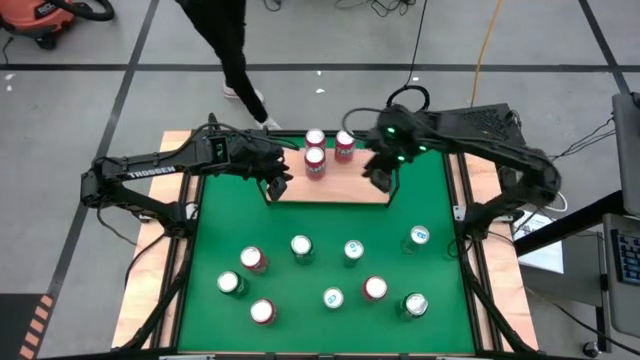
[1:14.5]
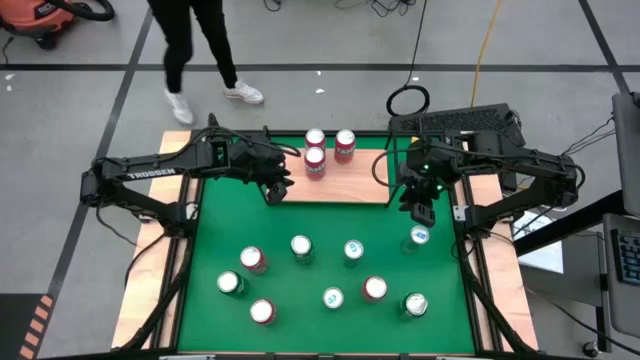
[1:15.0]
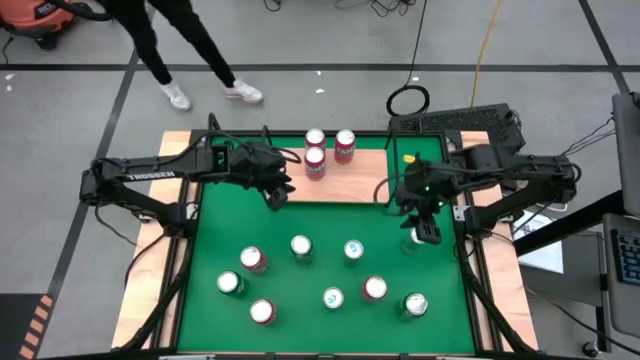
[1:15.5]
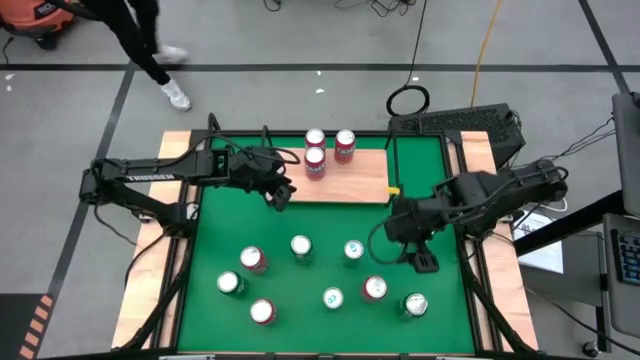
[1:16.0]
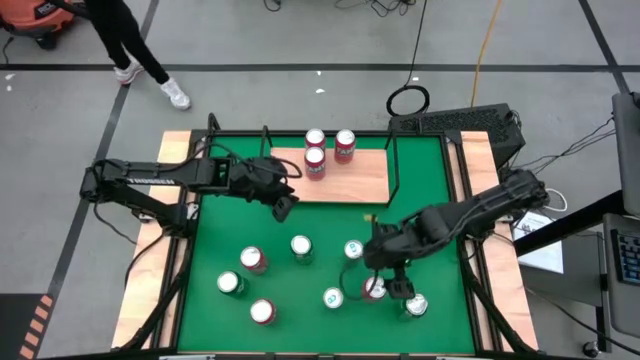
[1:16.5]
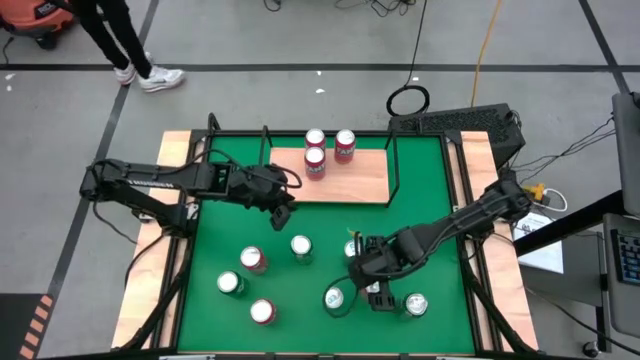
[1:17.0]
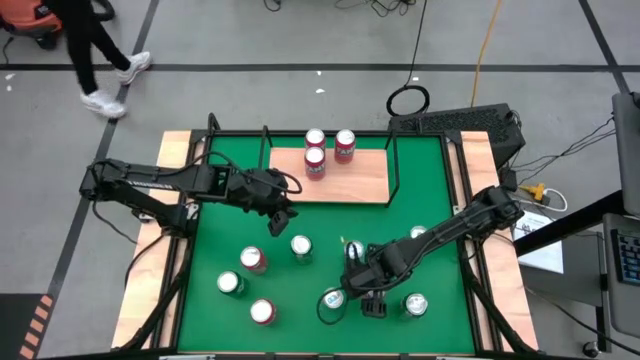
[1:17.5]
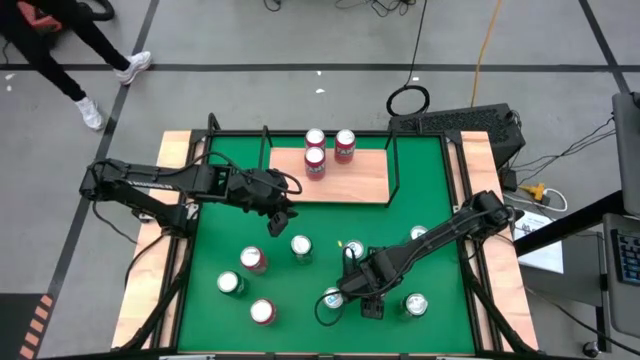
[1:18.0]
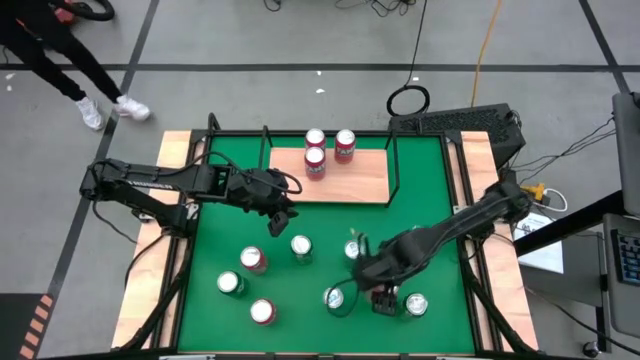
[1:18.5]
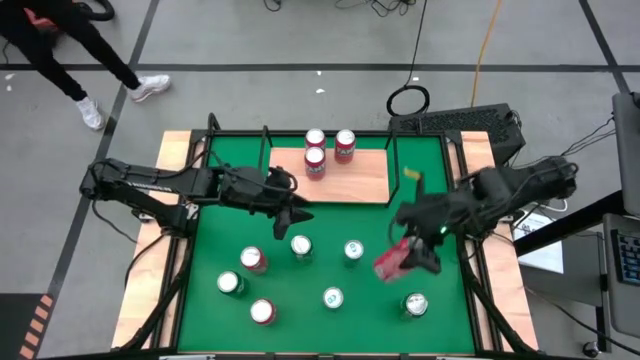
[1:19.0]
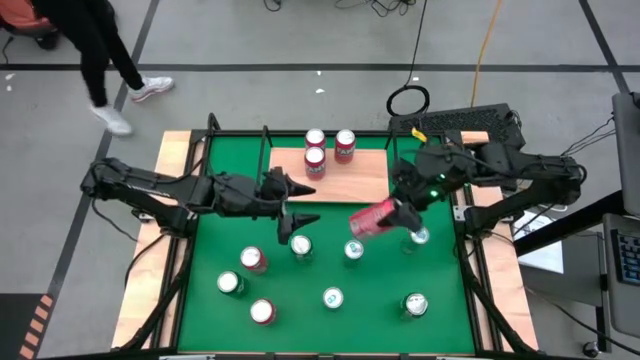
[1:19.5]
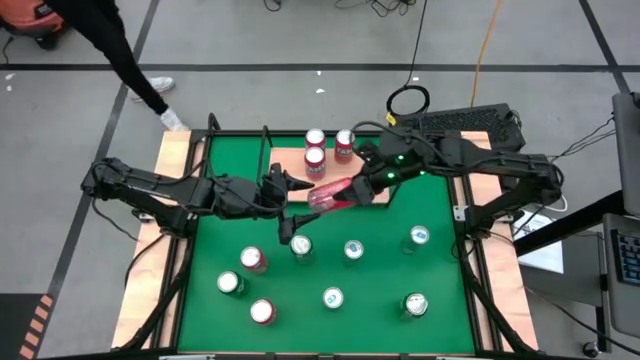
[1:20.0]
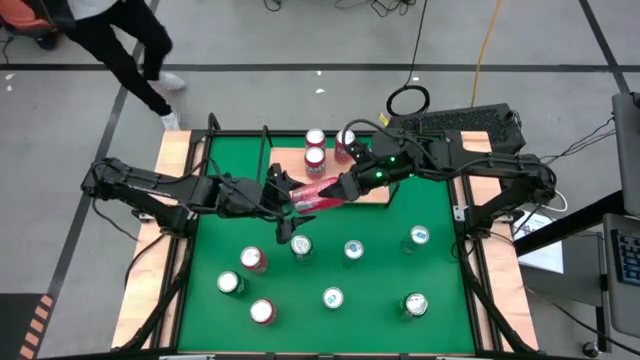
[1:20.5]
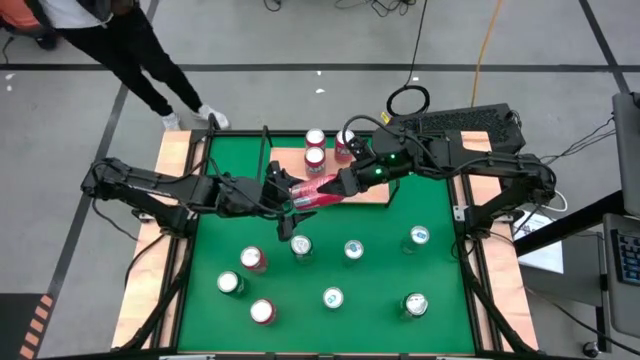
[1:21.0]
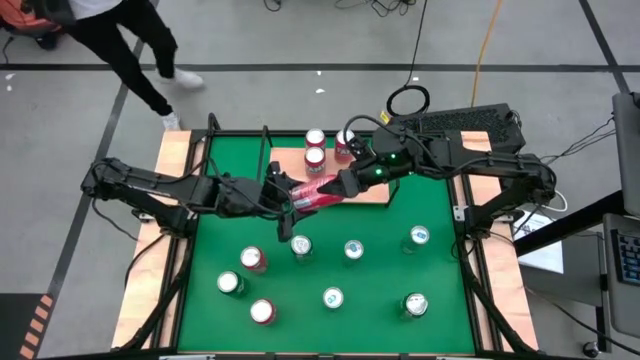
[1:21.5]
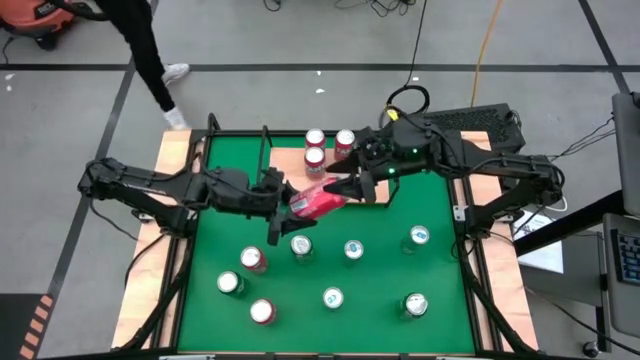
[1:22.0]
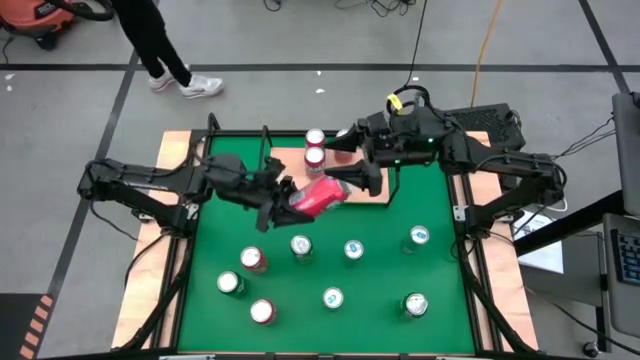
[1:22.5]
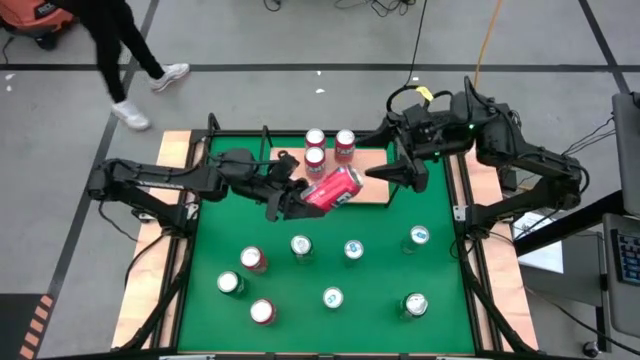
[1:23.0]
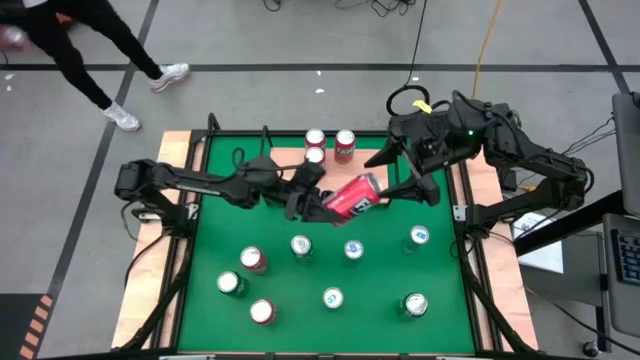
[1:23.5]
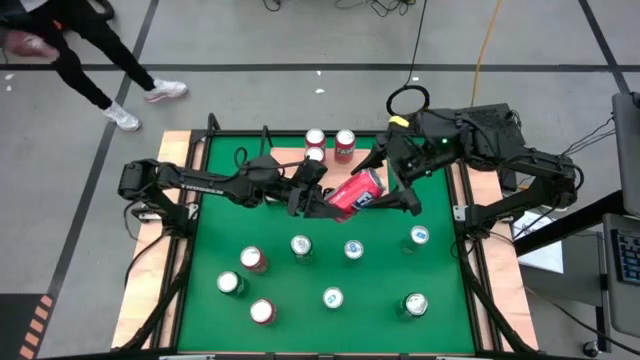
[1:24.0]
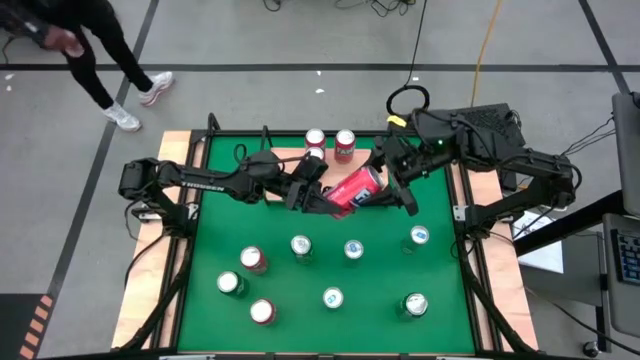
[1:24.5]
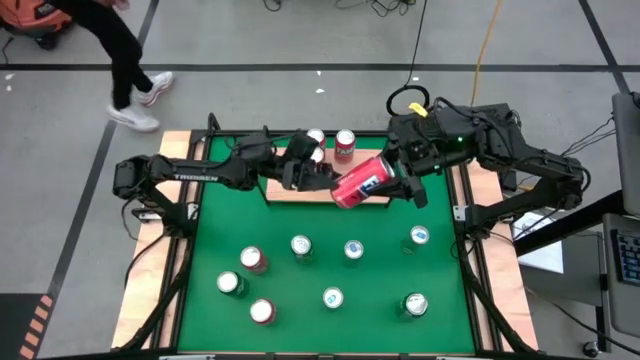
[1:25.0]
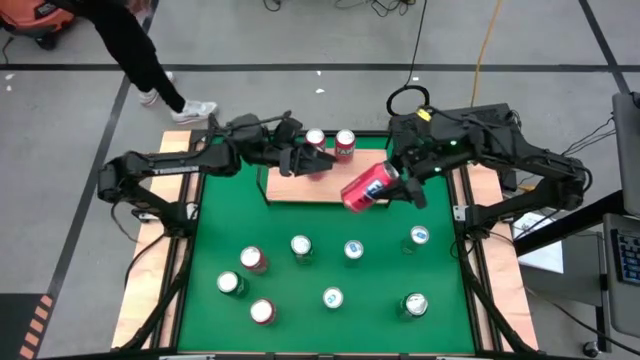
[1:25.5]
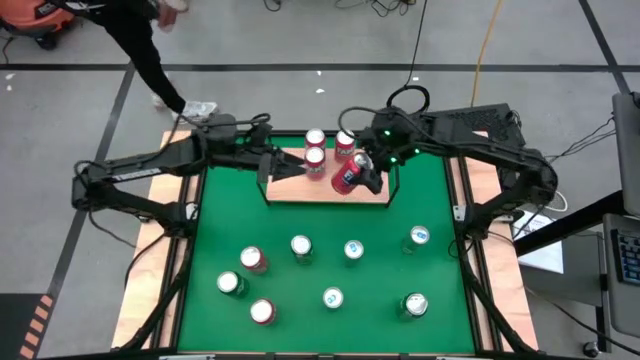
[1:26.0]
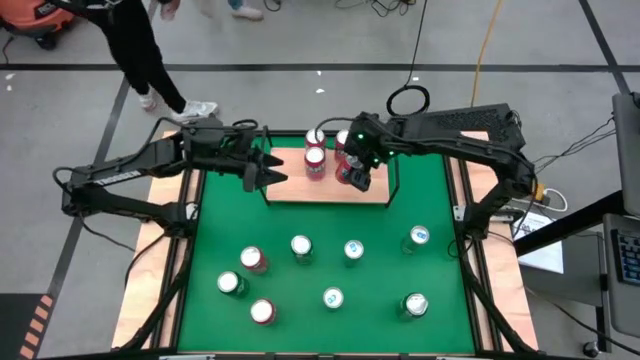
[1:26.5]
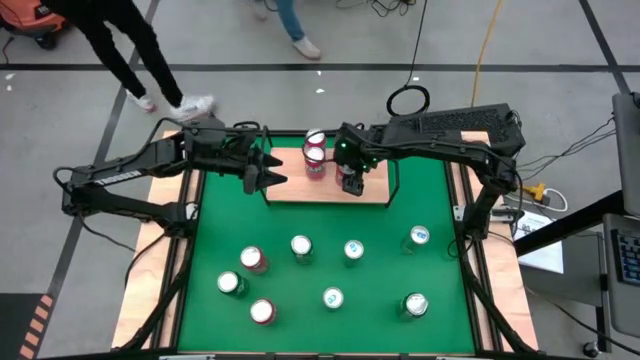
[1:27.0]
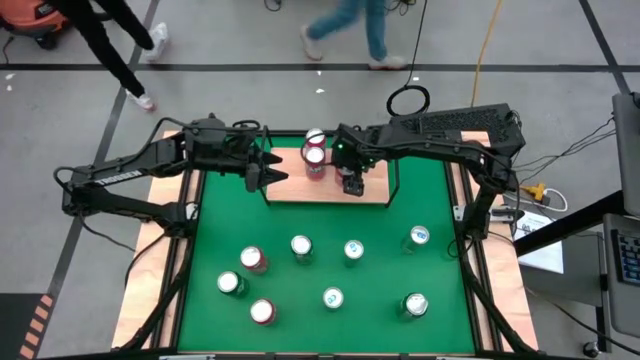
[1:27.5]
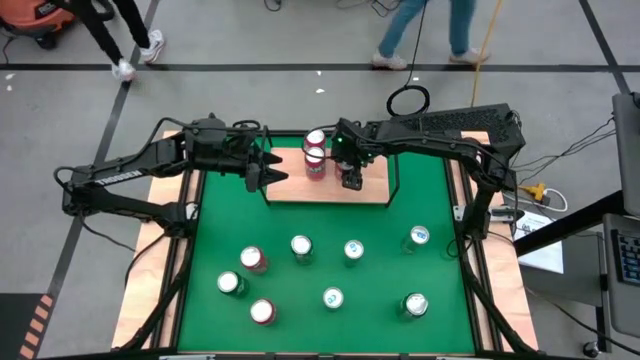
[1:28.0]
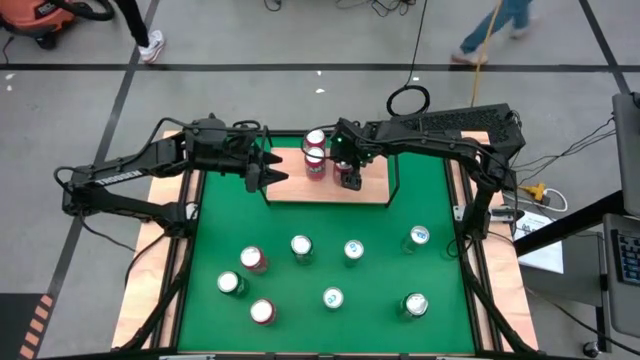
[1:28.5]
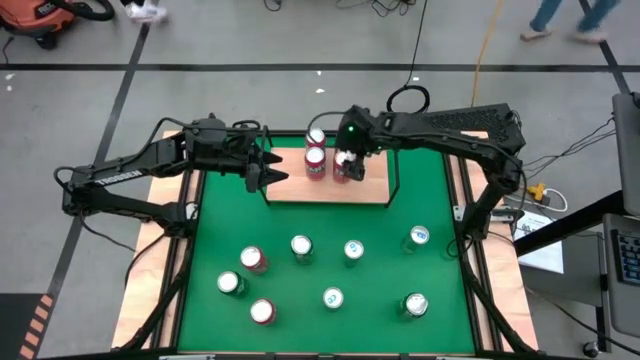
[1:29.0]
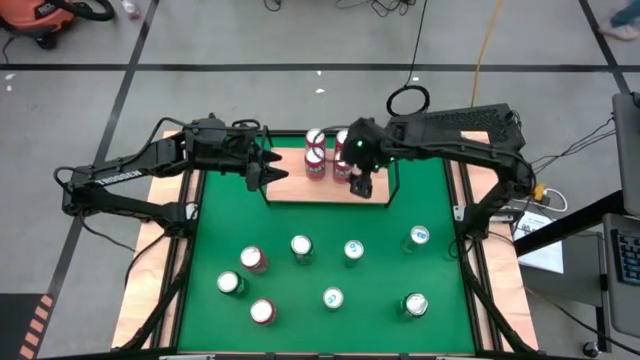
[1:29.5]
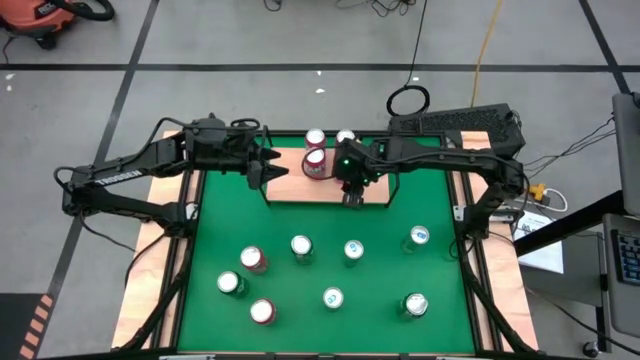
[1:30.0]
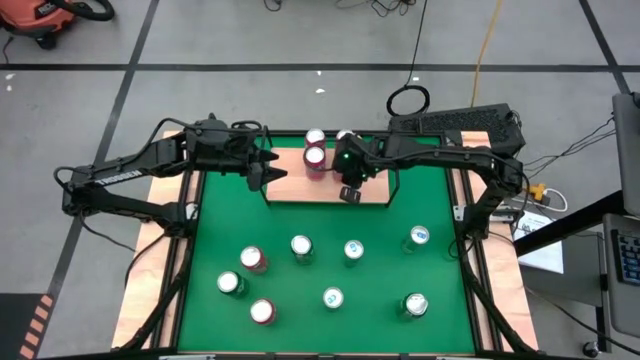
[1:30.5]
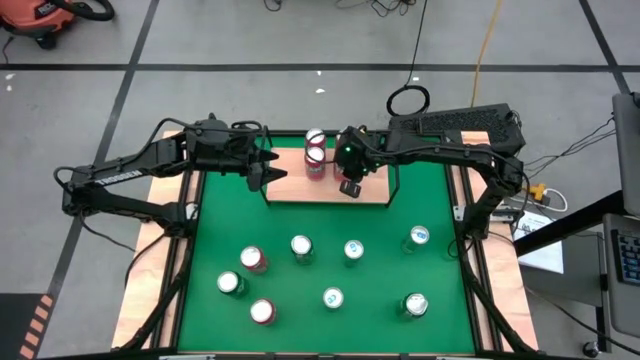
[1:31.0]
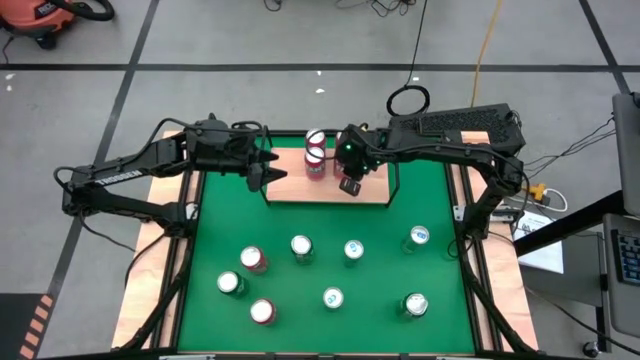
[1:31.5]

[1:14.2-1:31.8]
Task: Place canned beverage on shelf
Put the red soda can on the shelf aligned with the other right red soda can

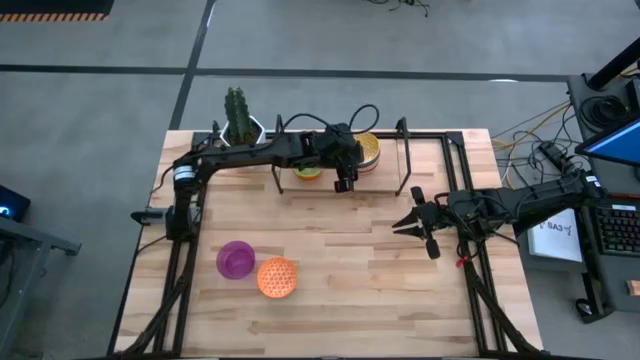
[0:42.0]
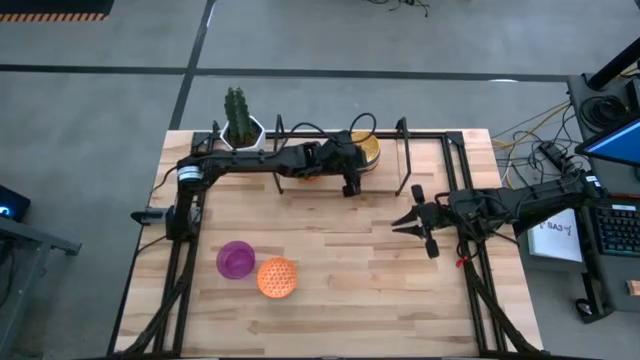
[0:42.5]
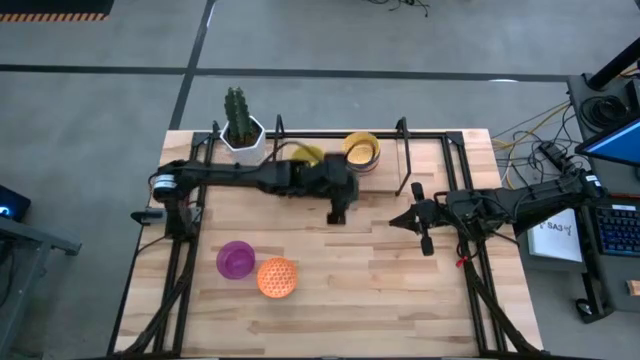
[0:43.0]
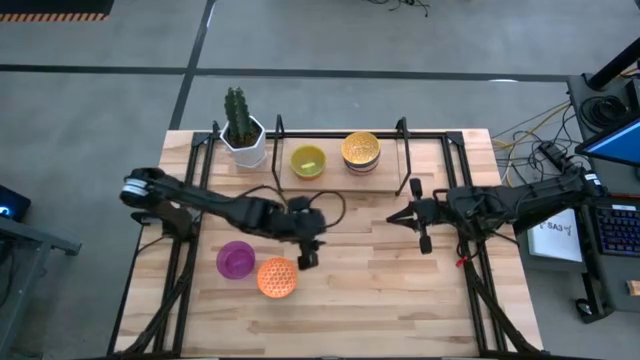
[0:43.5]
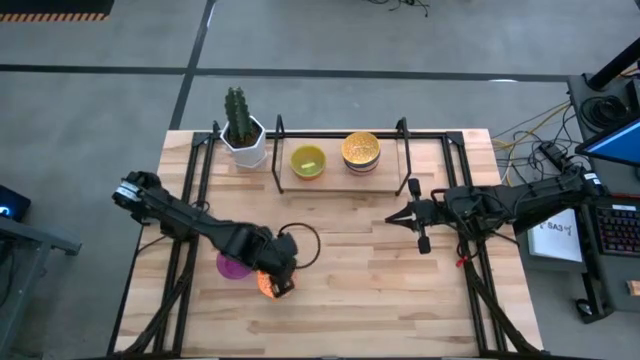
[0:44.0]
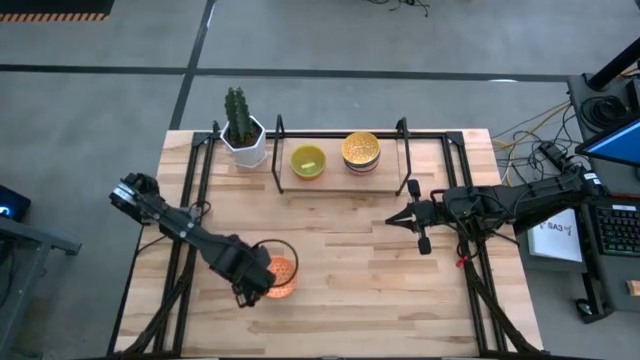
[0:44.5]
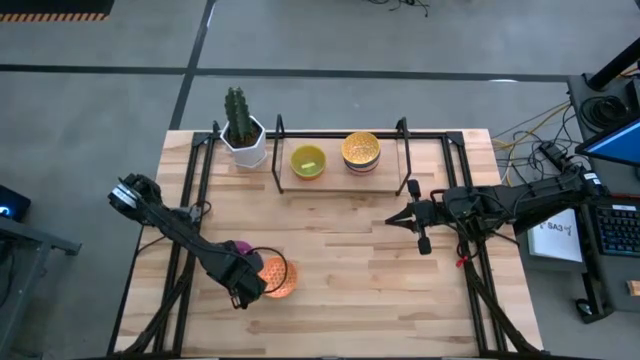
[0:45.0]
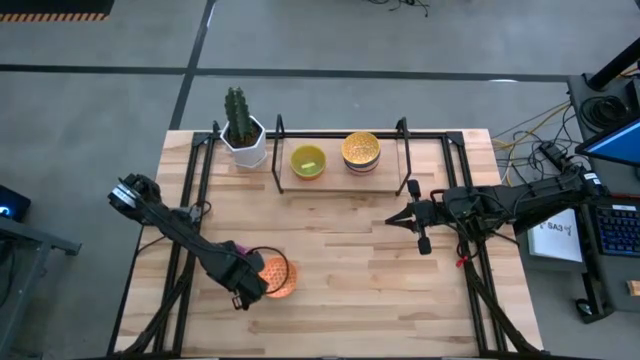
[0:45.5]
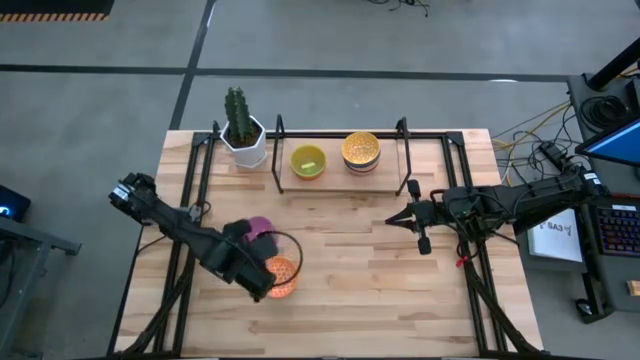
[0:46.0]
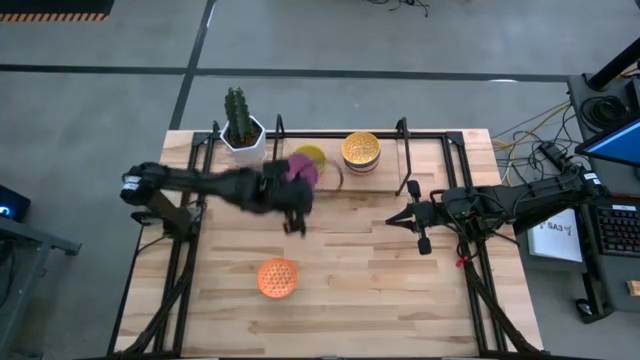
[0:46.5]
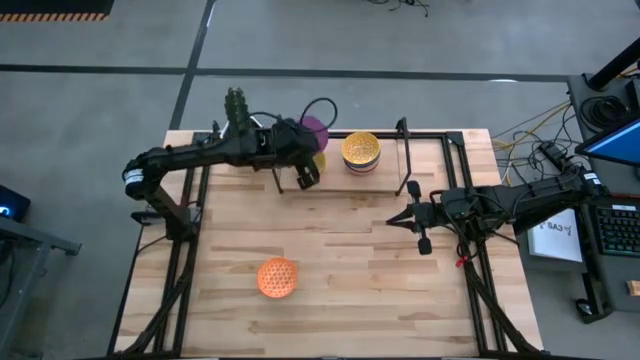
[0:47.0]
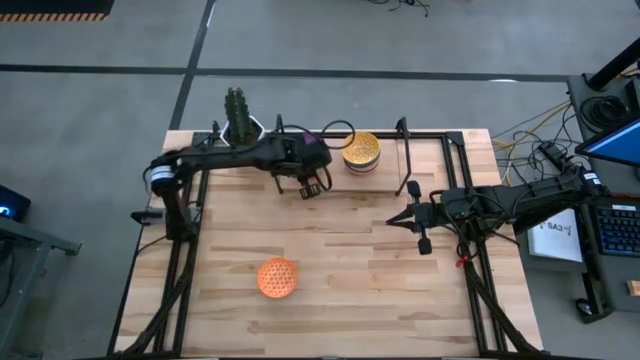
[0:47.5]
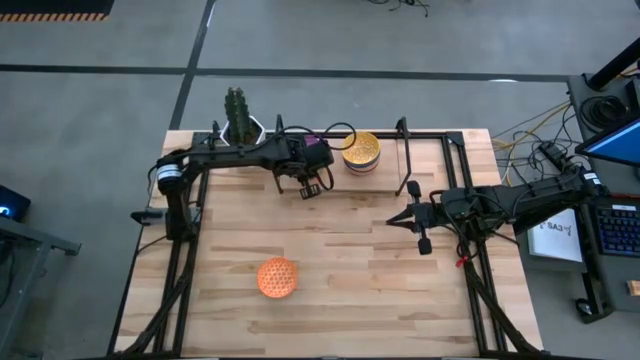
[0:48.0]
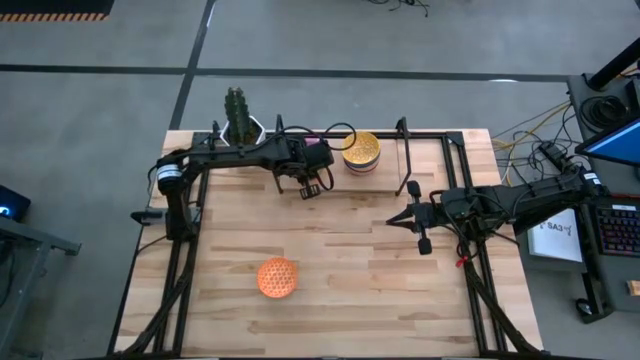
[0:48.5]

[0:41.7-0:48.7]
Task: Place and stack bowls onto a shelf
Stack the violet bowl on the yellow bowl on the shelf
